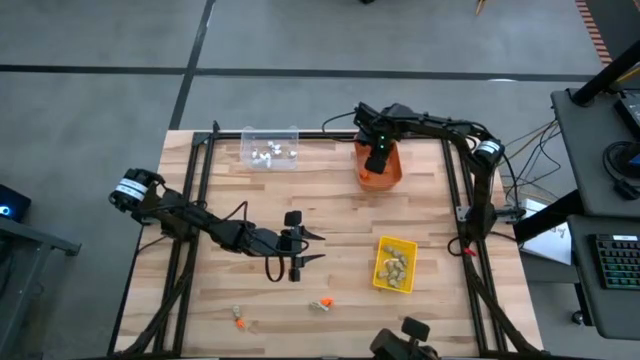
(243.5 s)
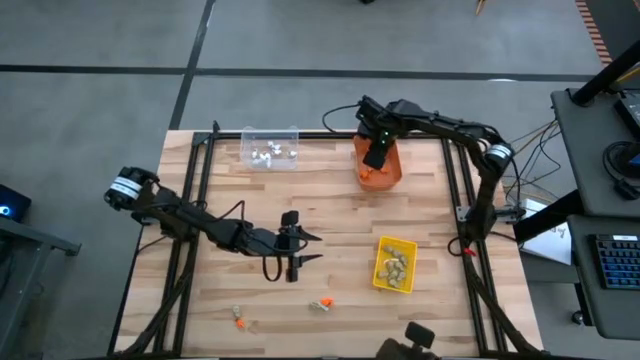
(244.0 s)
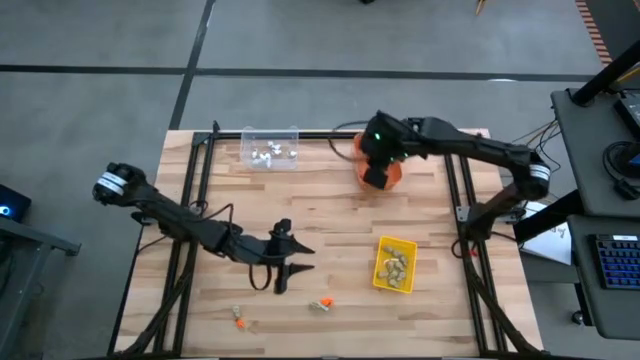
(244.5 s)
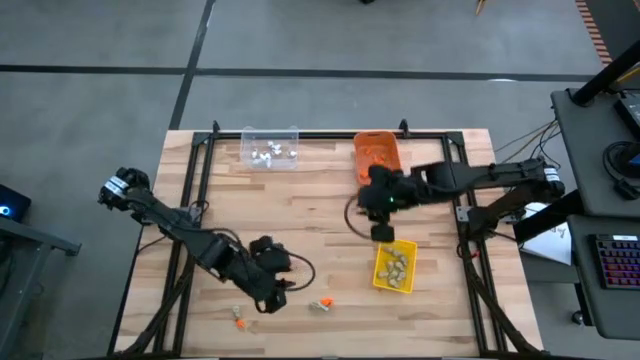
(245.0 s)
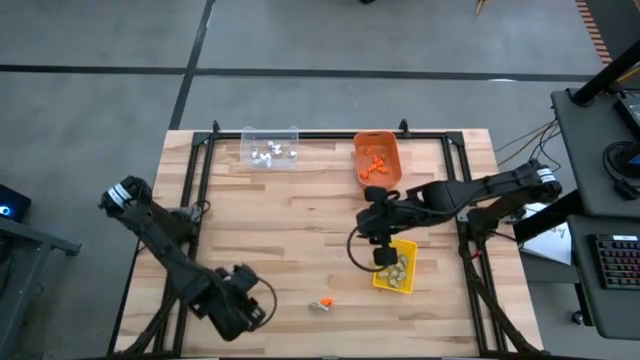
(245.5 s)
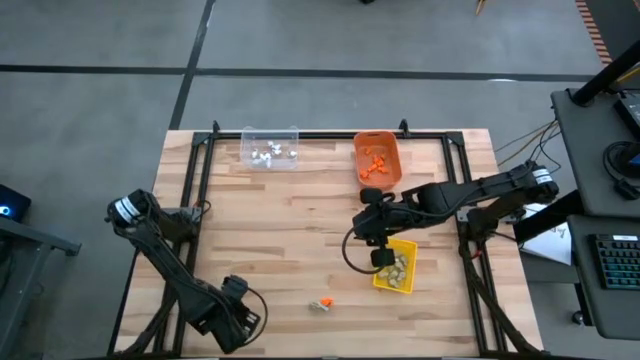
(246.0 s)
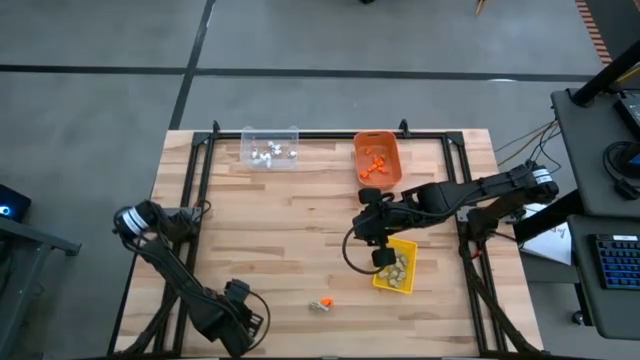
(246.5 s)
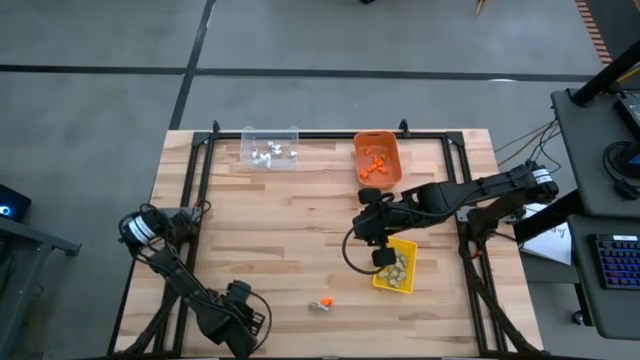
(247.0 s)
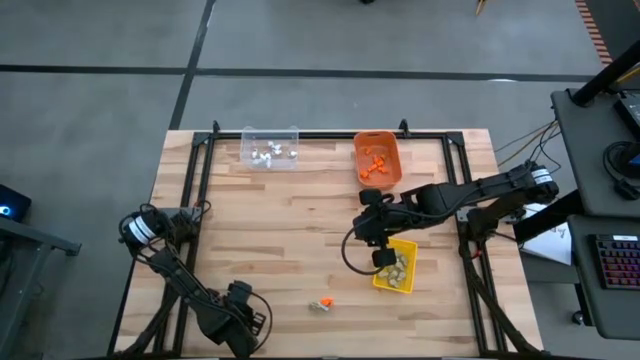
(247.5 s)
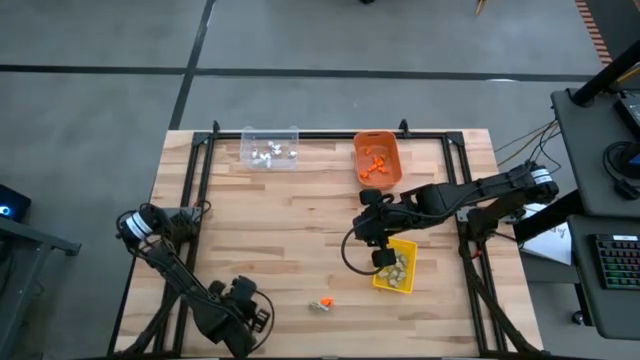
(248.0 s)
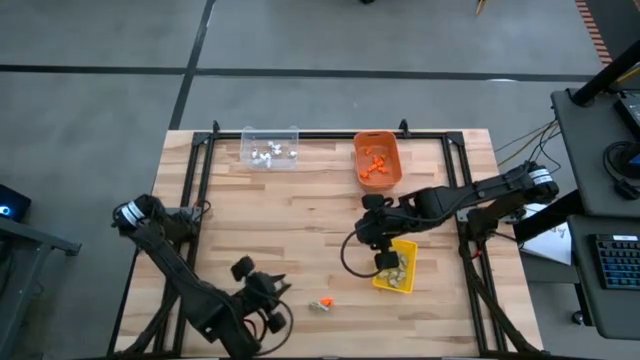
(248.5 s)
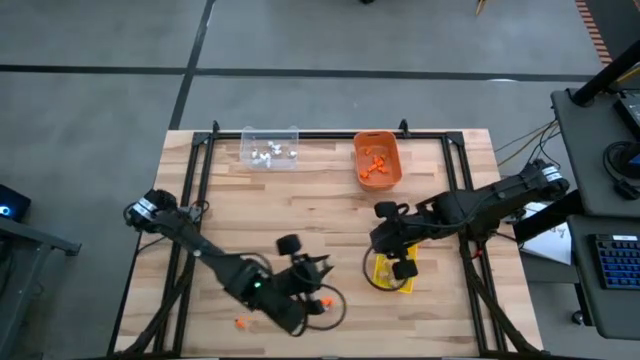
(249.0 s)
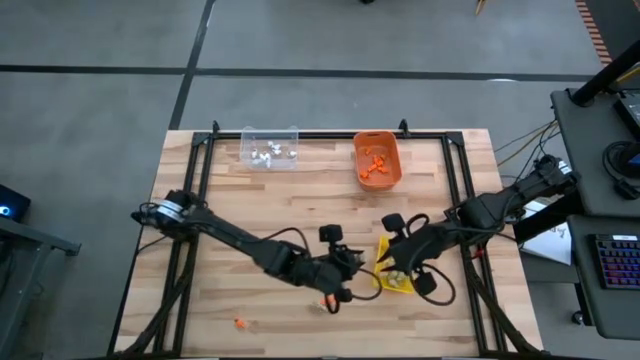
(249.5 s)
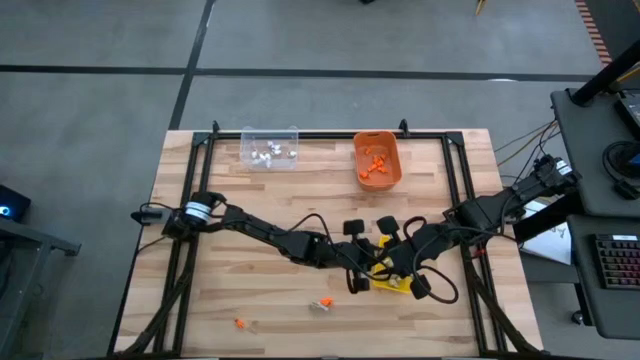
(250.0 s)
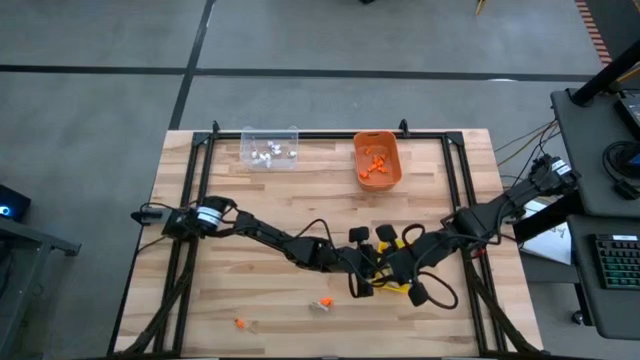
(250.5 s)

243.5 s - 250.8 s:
Task: Sort Halloween decoration
Put the gray skull toy into the yellow bin

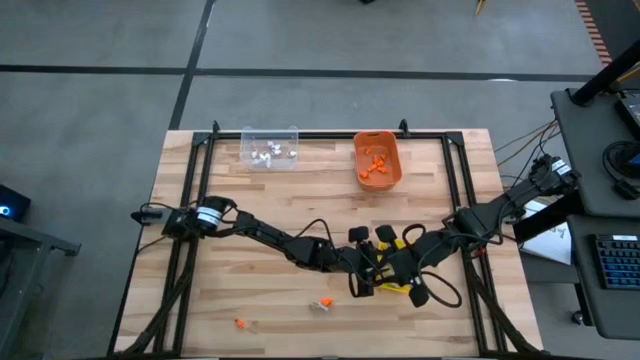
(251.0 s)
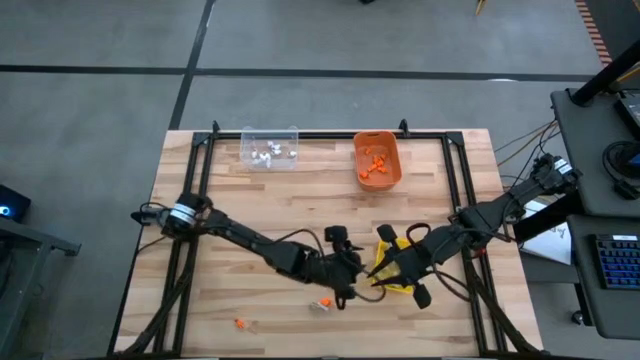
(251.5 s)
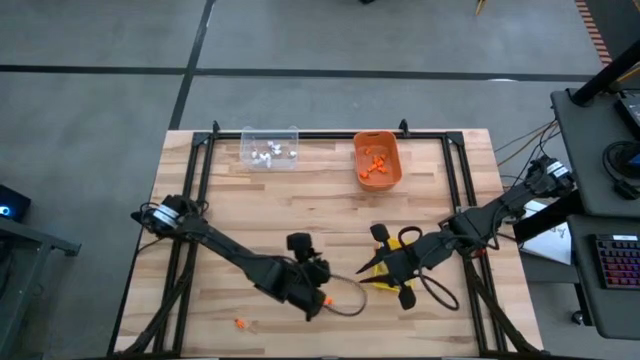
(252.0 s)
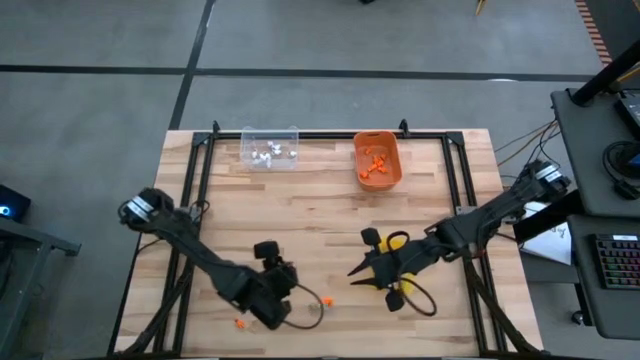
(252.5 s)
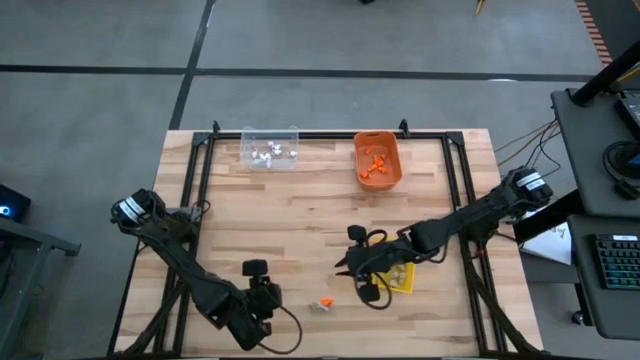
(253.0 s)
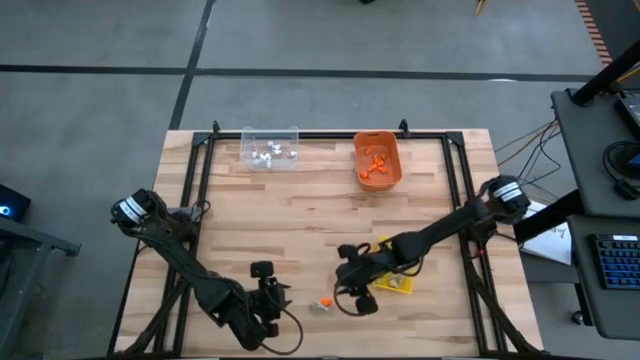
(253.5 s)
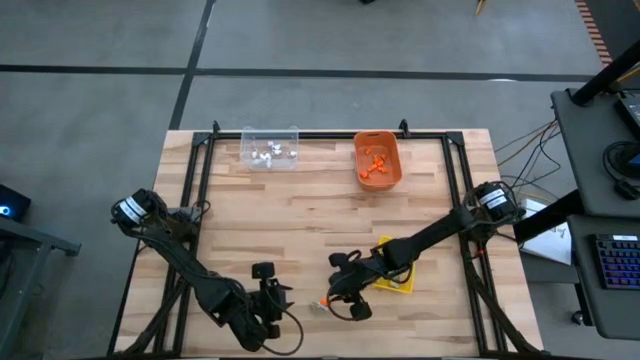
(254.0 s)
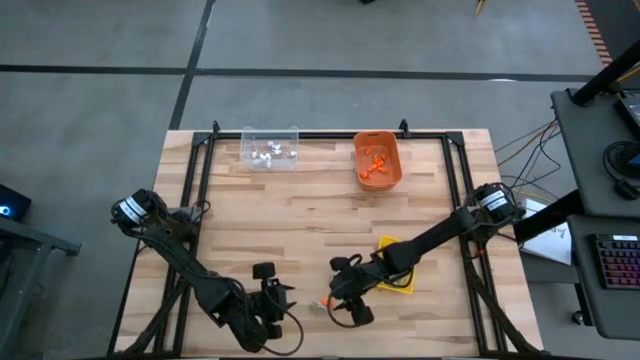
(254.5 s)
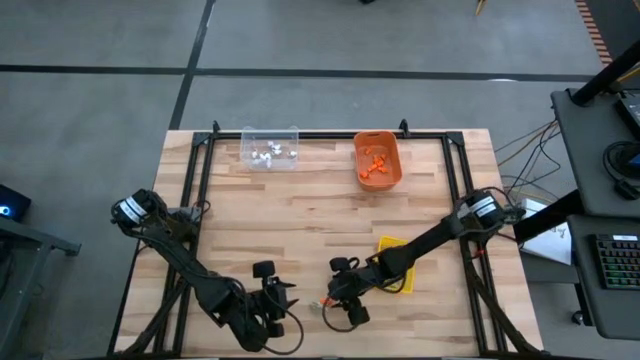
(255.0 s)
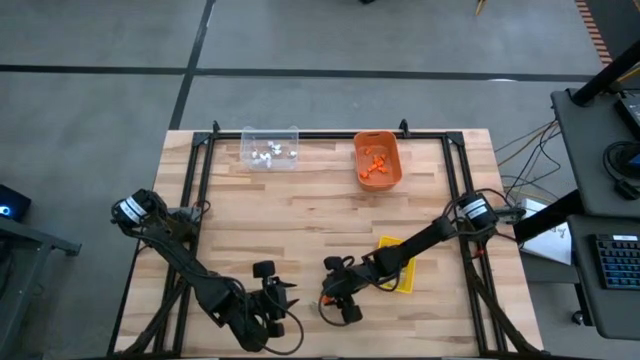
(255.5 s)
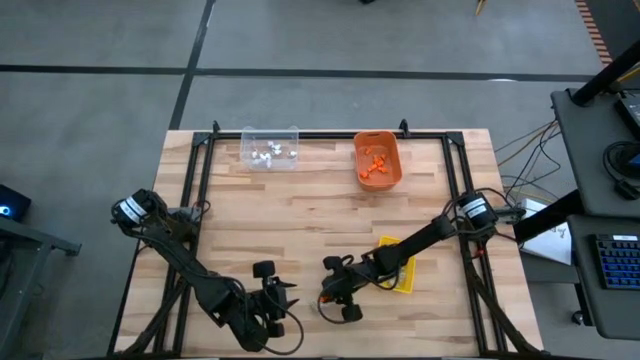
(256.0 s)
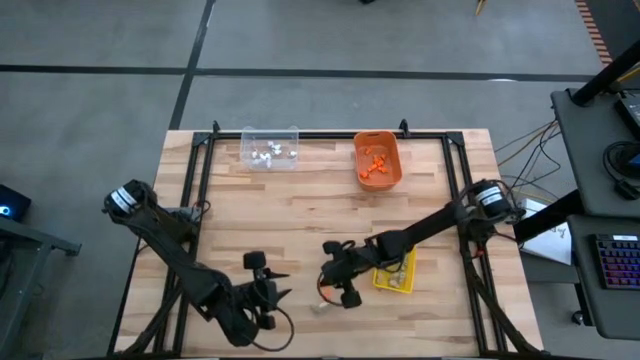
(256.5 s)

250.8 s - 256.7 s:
Put the orange skeleton toy into the yellow bin

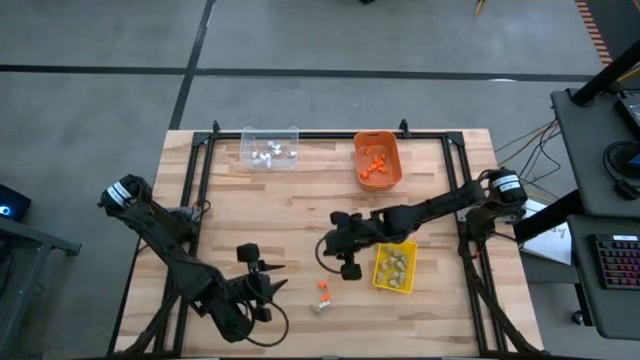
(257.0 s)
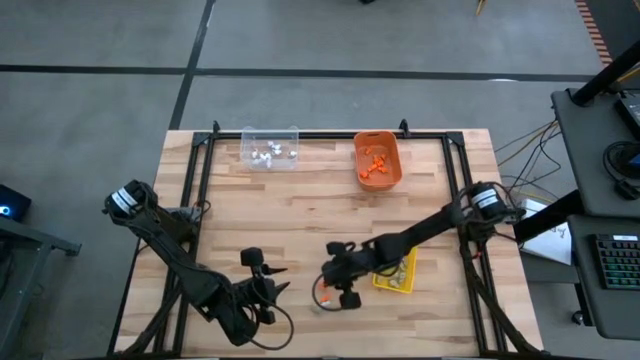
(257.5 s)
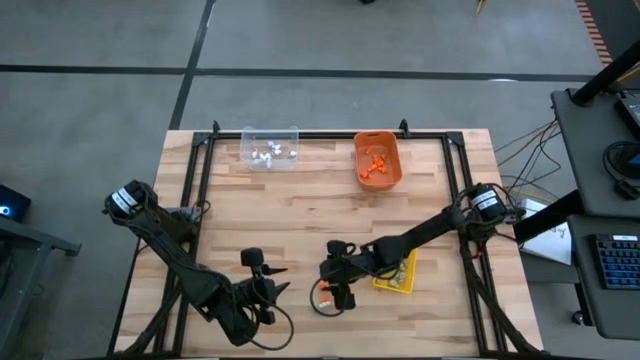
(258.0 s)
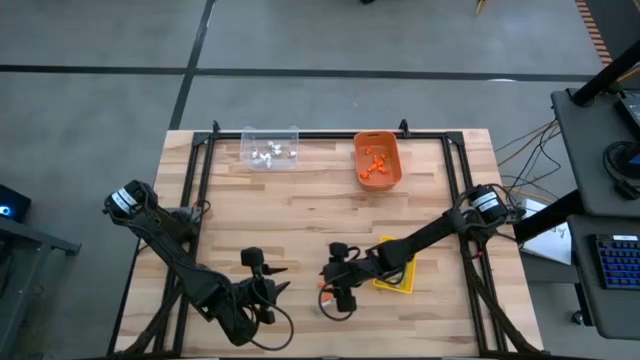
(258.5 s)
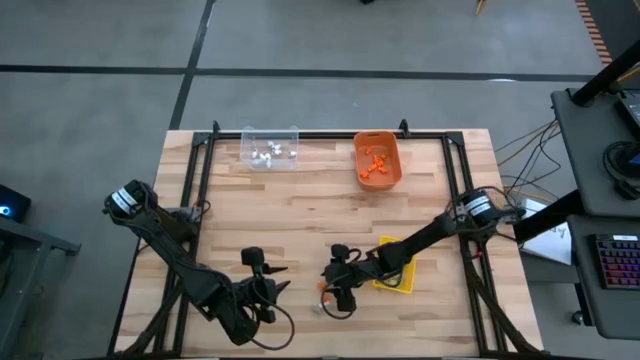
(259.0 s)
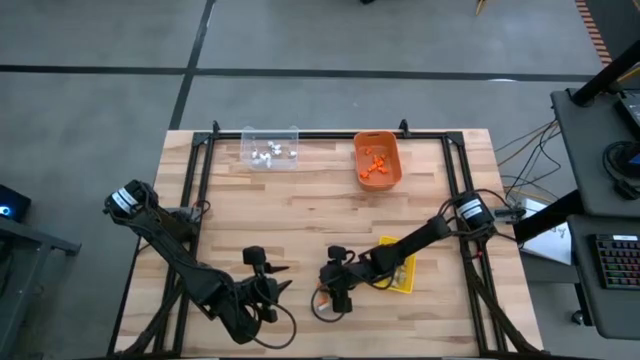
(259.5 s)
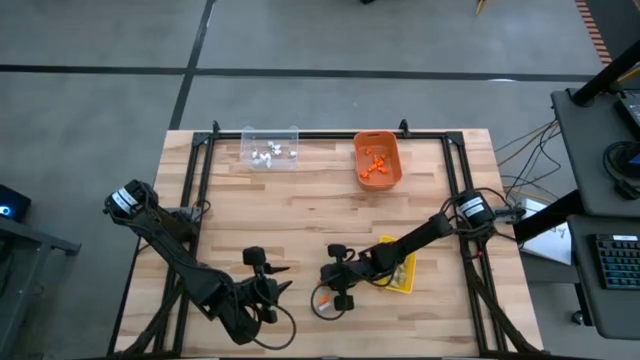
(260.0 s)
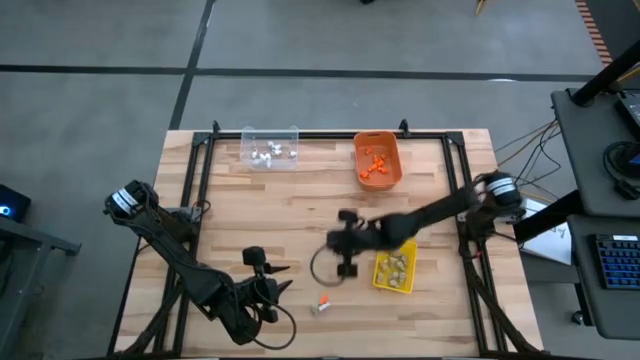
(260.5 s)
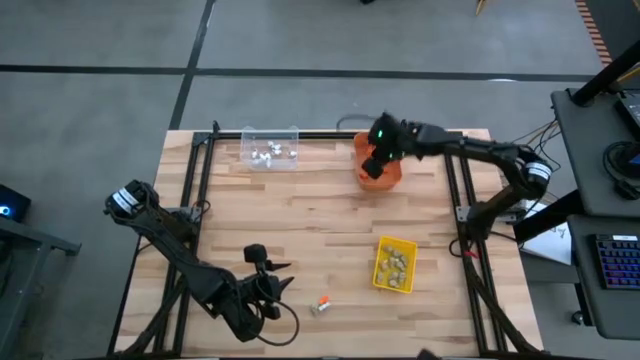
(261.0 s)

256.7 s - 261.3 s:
Put the orange skeleton toy into the yellow bin

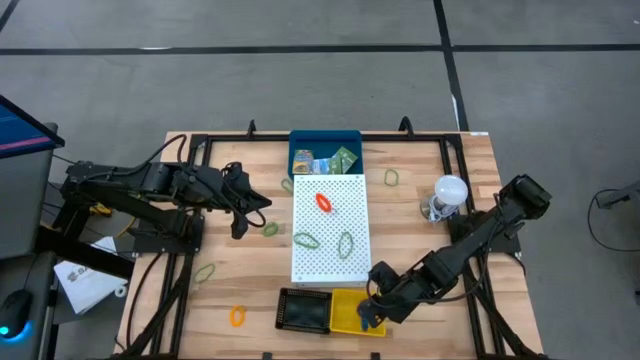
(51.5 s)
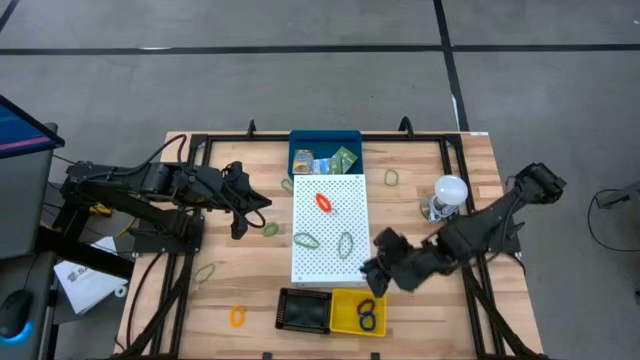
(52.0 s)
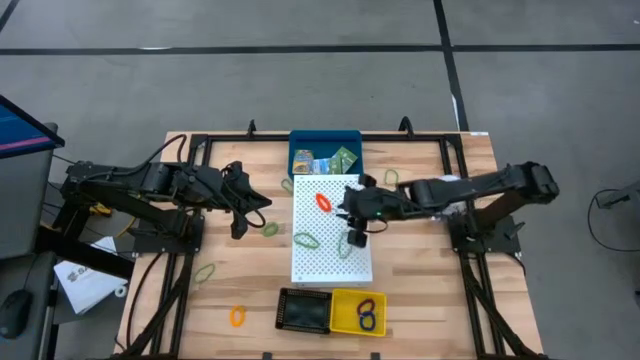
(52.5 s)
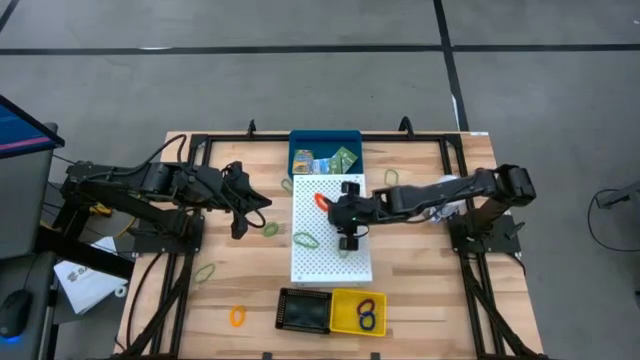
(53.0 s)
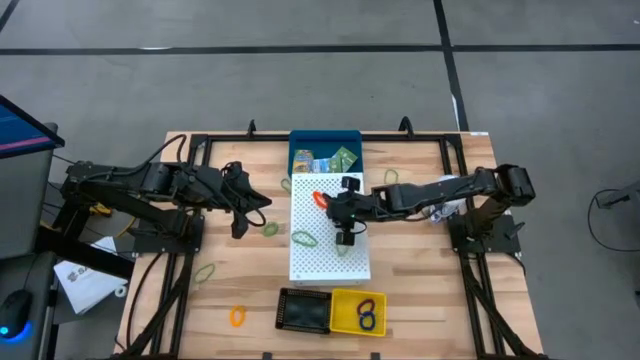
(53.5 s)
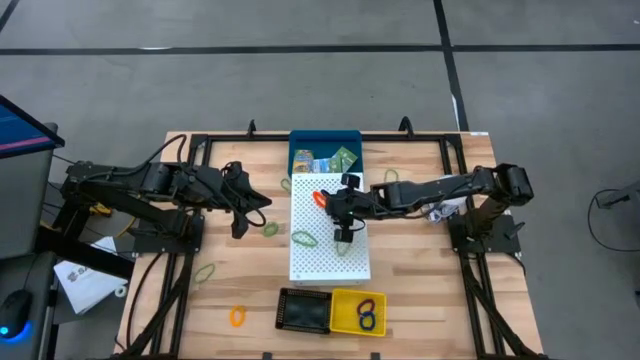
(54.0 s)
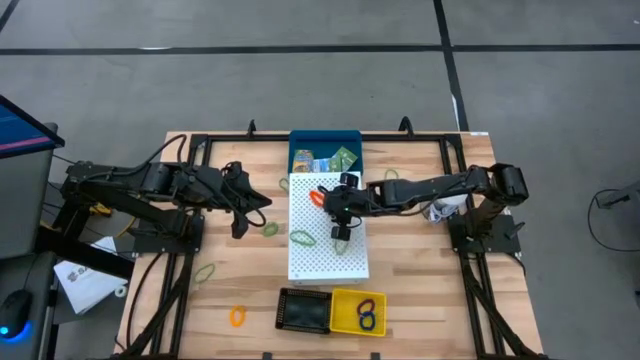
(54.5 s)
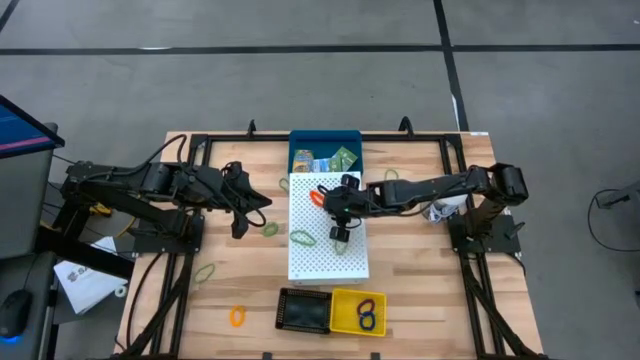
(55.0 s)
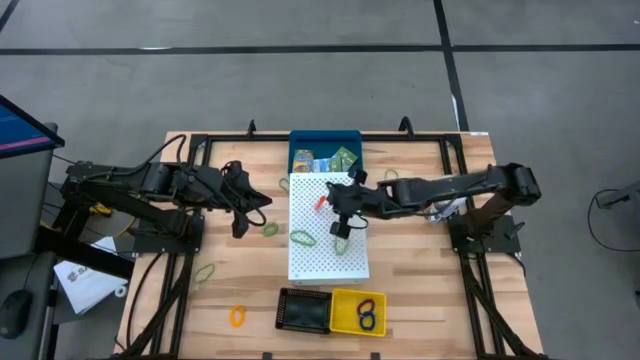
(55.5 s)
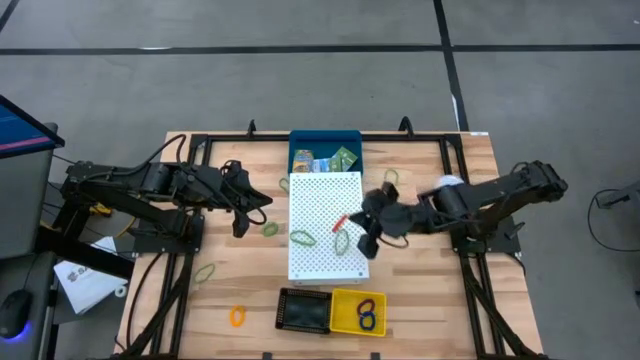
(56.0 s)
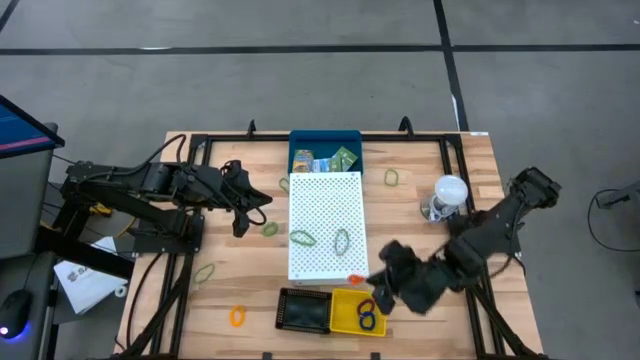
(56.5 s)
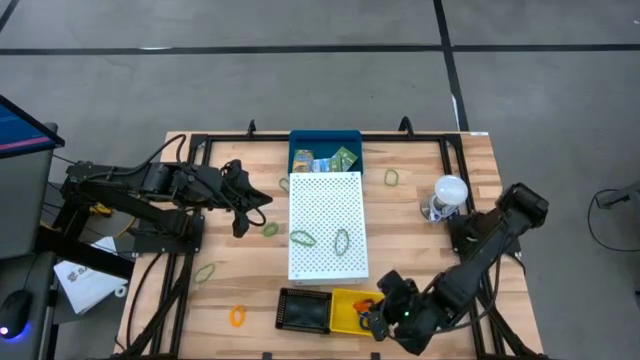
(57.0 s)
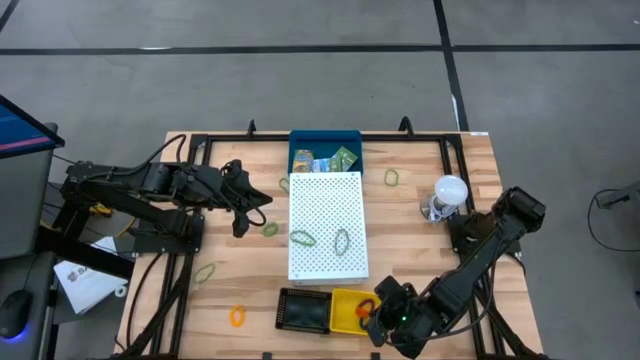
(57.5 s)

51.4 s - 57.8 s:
Task: Pick & Place Office Desk Supplies
Put the orange spring keychain into the yellow bin
